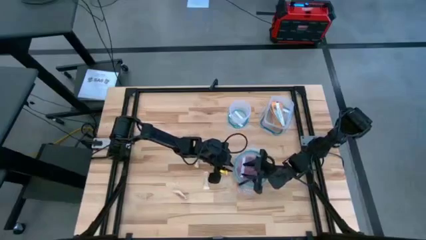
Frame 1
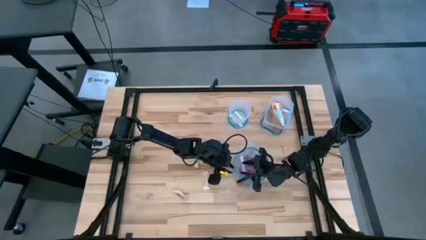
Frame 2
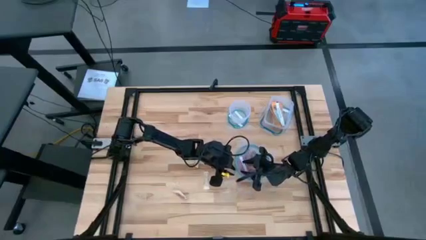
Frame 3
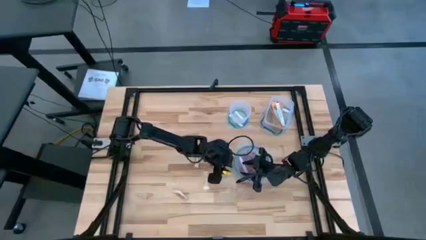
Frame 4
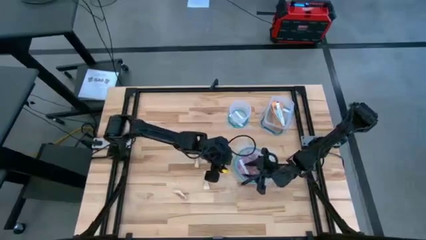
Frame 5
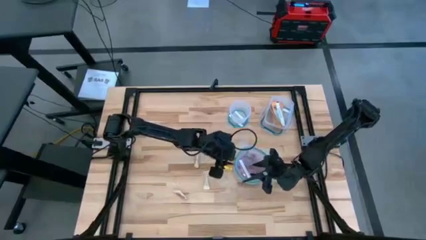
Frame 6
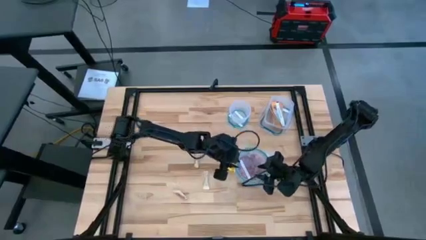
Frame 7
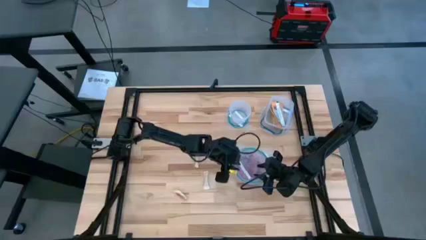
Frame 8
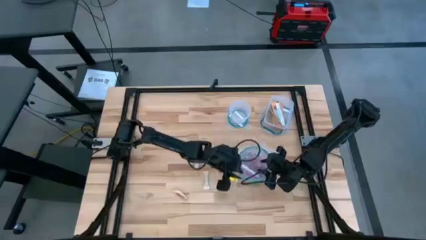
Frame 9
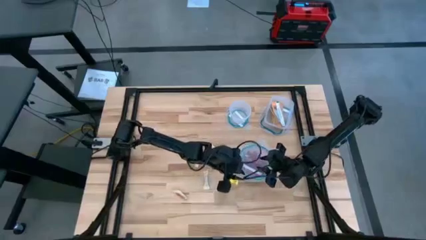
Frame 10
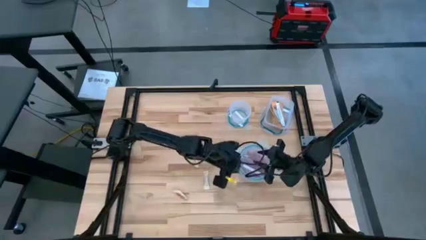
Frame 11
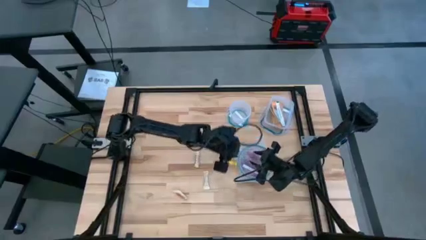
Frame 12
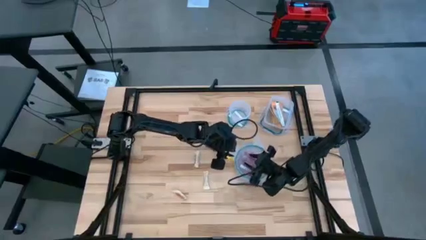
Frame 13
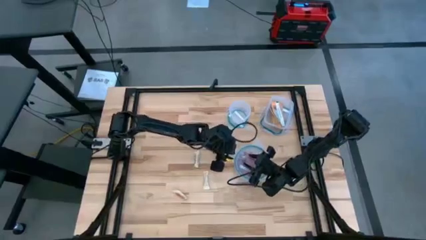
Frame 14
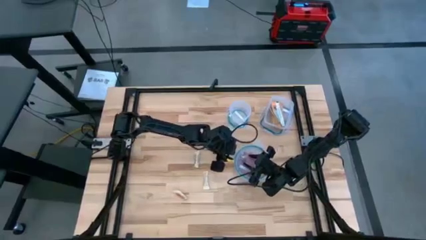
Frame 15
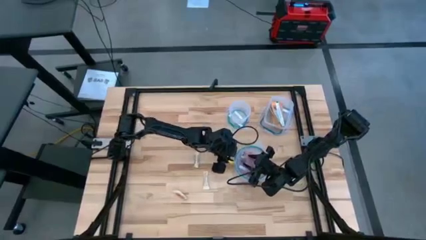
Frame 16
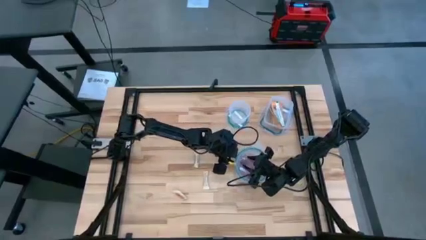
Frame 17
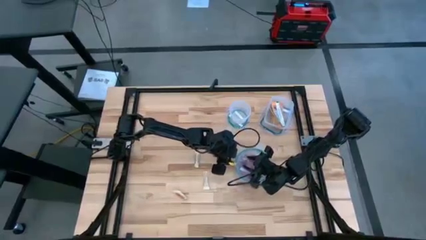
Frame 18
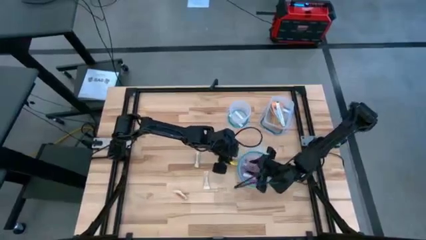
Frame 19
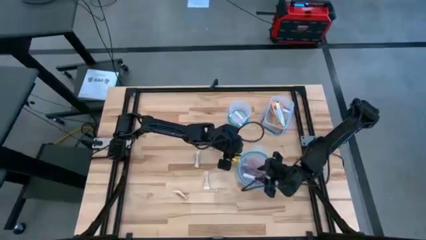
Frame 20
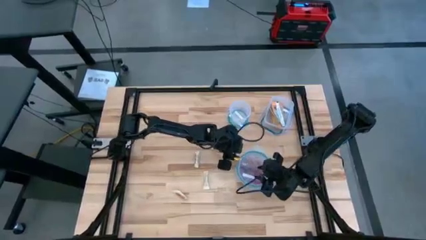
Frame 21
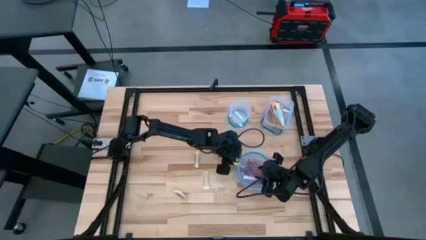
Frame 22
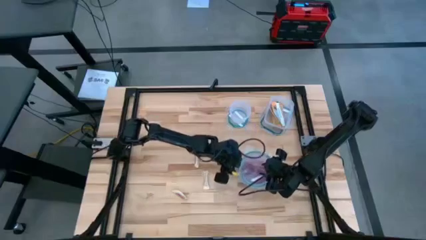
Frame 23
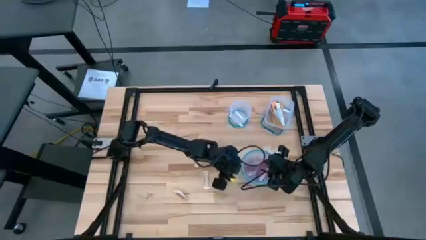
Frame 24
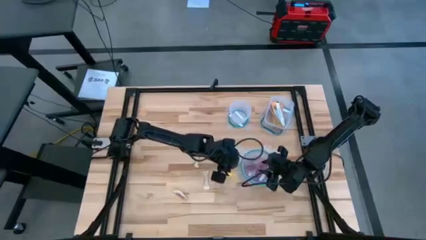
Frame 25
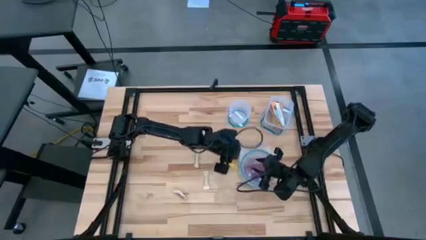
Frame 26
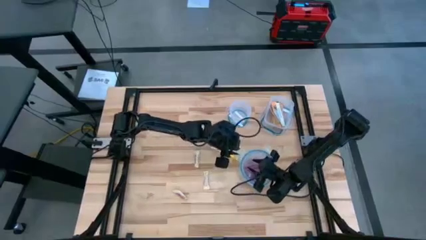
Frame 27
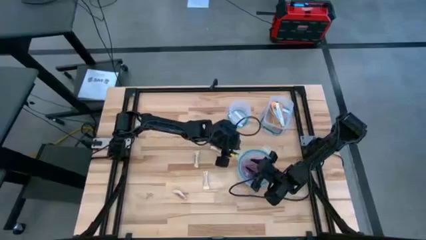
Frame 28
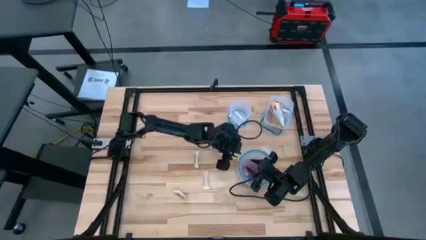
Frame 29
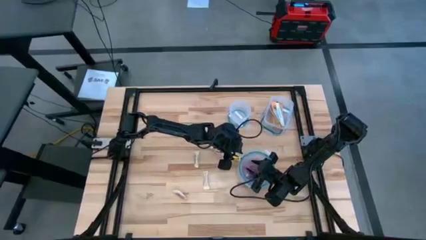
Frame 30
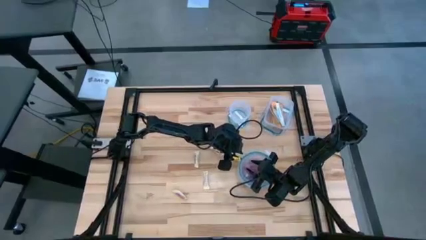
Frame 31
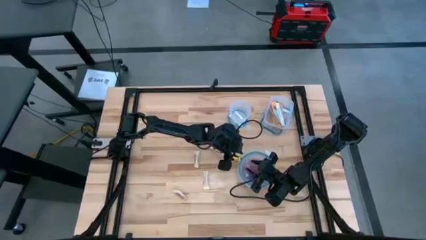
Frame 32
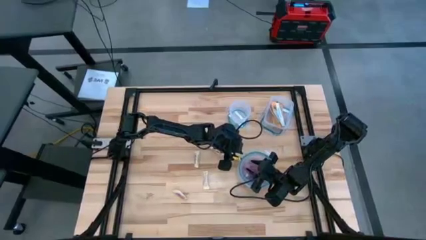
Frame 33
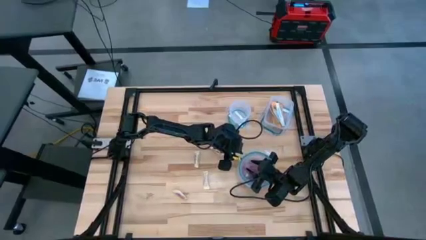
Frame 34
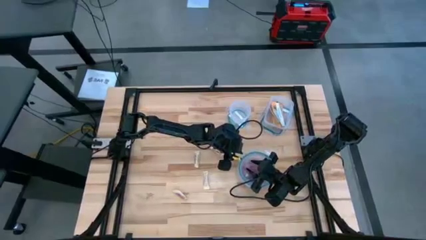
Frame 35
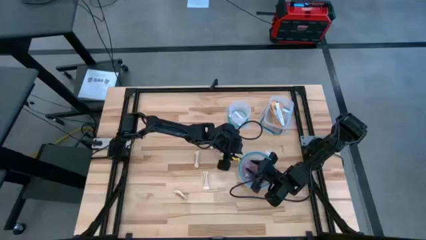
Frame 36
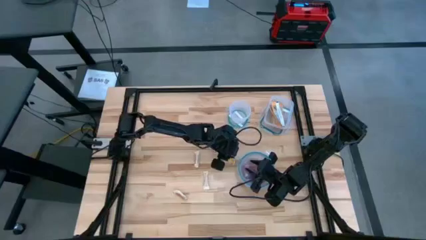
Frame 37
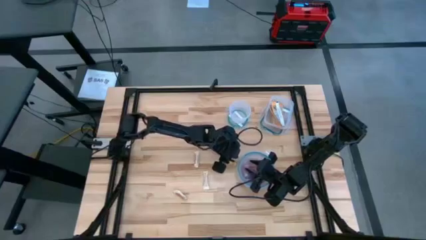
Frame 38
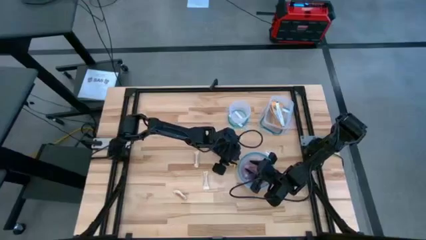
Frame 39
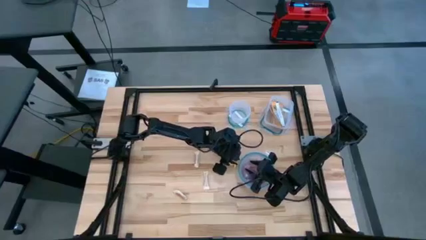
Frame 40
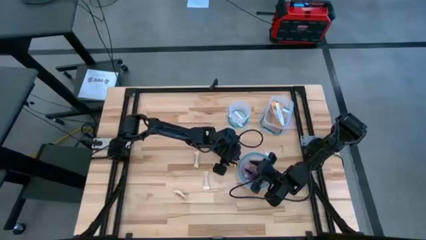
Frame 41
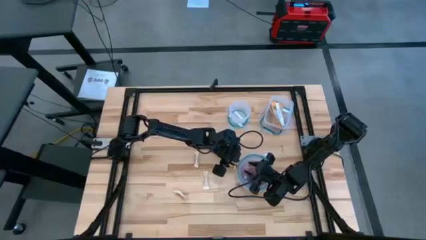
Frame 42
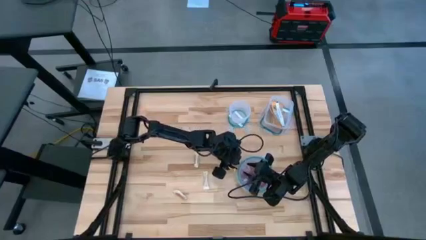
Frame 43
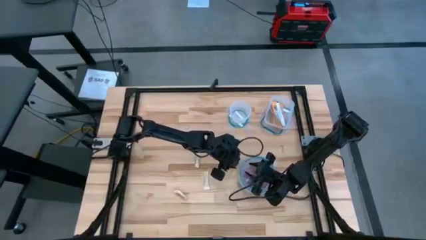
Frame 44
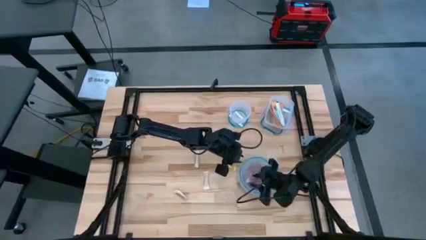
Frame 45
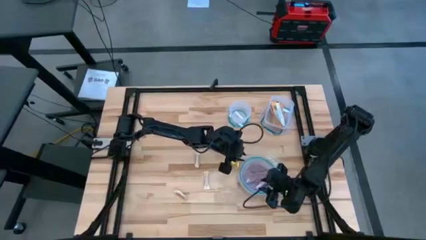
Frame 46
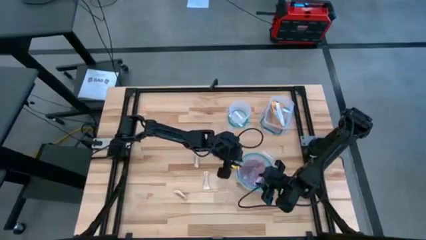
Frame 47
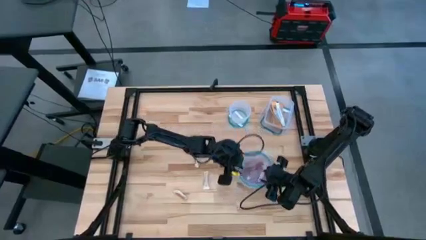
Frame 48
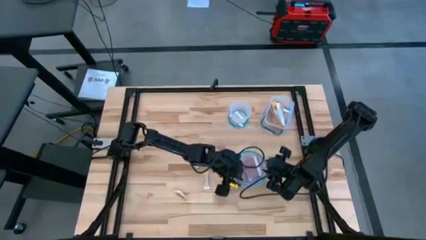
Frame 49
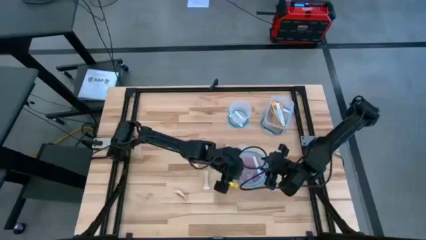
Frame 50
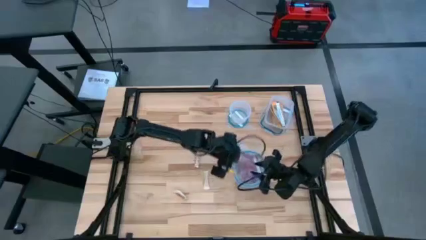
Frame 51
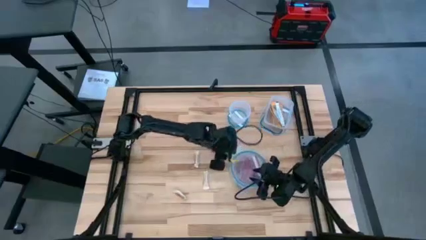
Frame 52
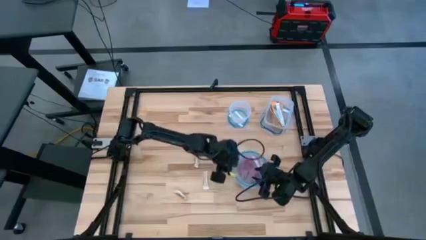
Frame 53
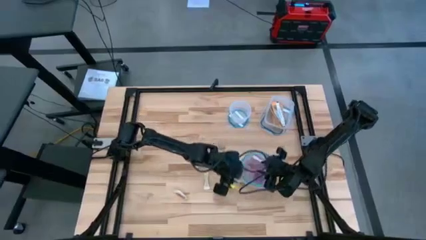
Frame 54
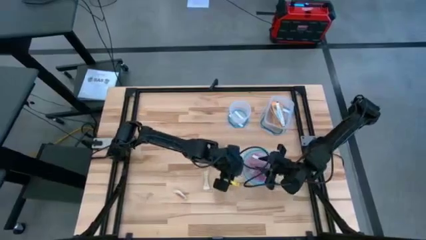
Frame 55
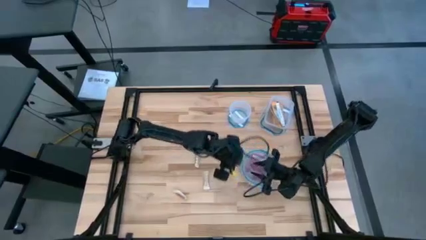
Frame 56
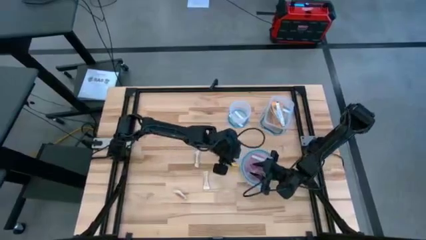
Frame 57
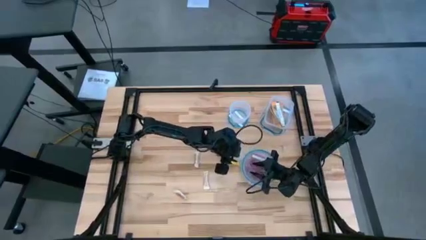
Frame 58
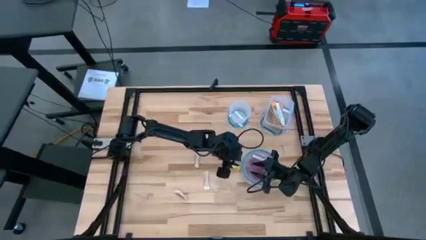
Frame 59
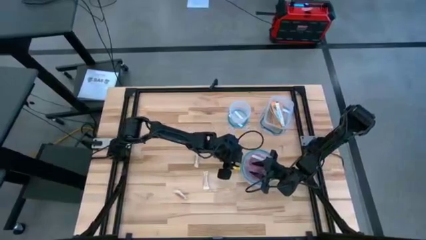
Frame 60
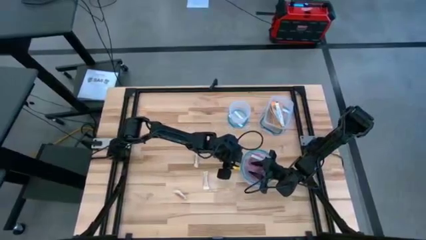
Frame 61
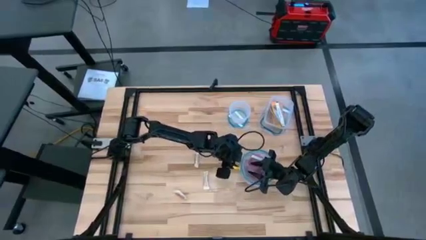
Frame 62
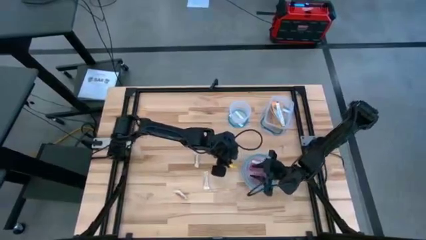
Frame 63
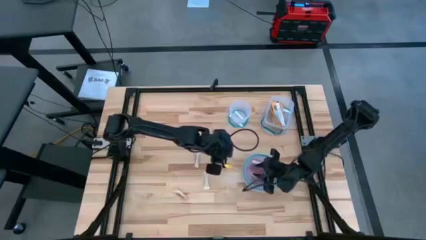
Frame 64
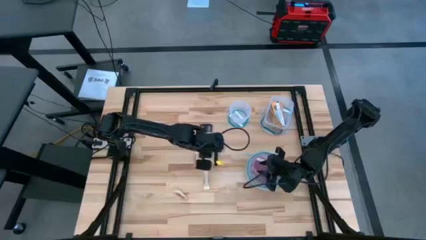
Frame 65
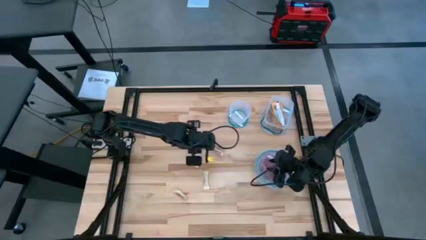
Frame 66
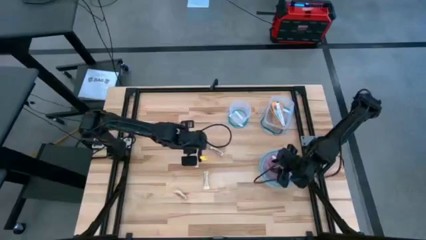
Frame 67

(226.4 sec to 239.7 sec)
Task: Sort candy
Close the big round transparent bin

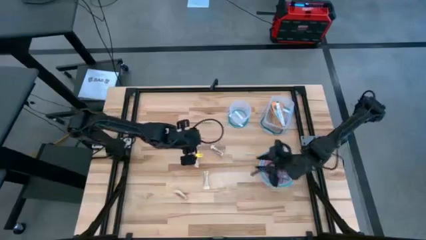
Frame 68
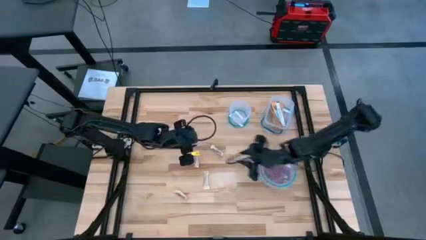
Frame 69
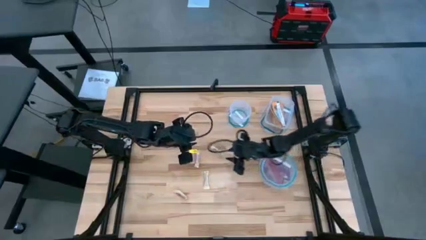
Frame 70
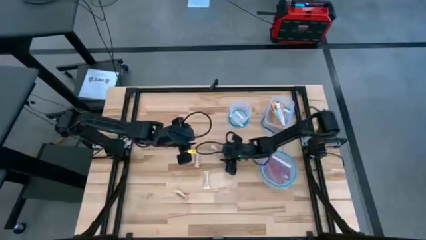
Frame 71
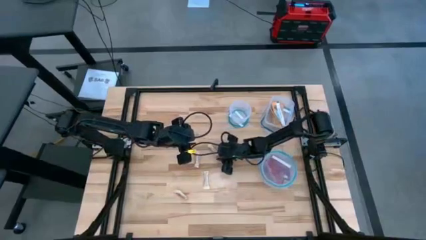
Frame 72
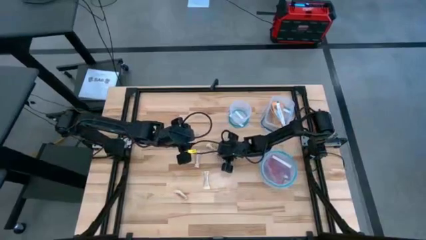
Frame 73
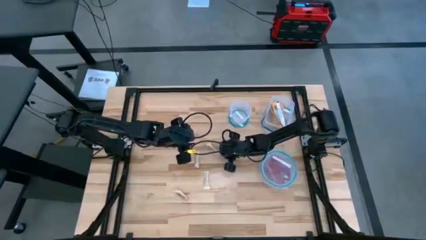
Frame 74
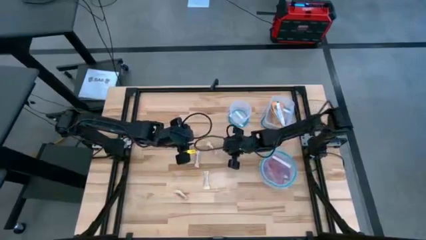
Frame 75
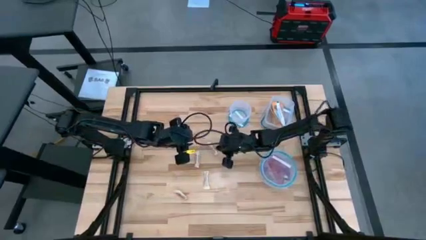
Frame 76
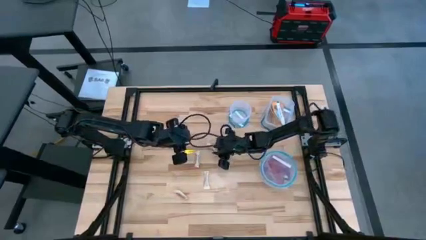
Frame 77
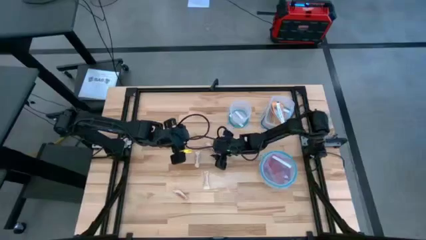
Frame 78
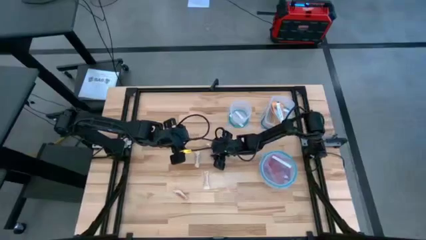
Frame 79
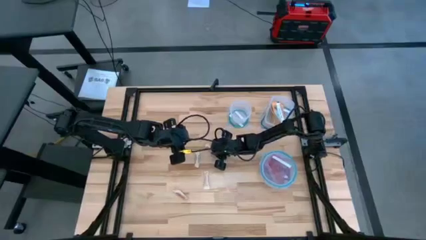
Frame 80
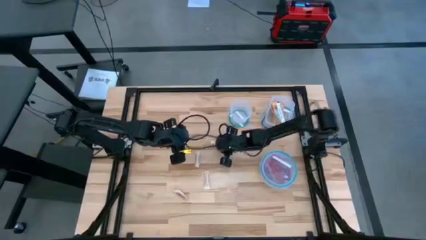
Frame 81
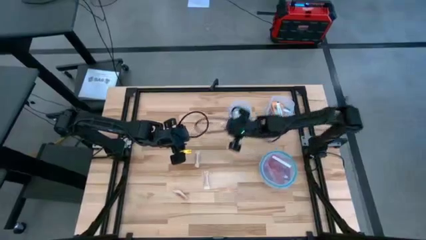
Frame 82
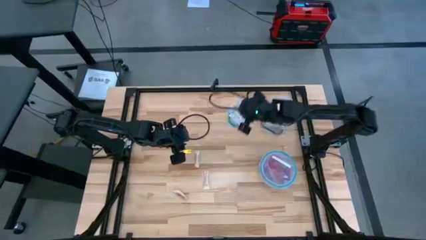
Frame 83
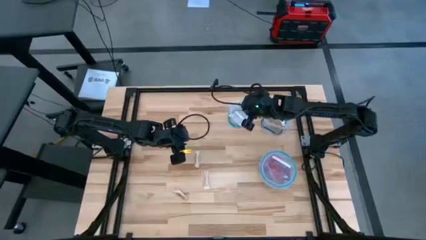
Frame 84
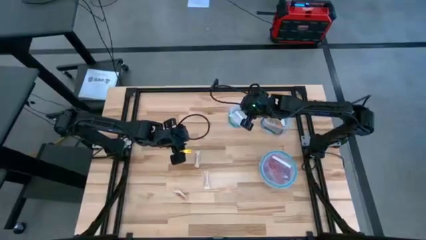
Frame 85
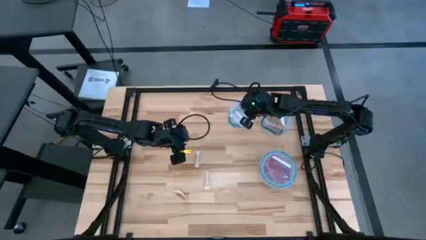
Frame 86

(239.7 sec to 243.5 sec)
Put the white candy into the small round transparent bin

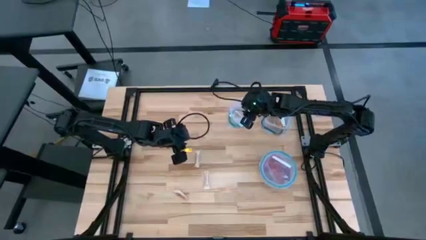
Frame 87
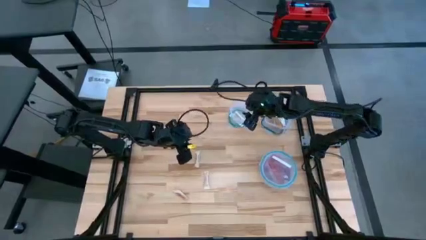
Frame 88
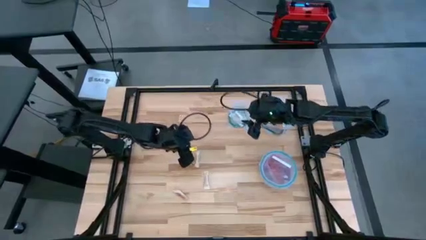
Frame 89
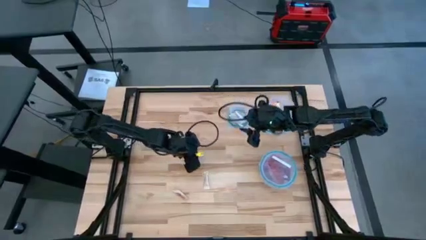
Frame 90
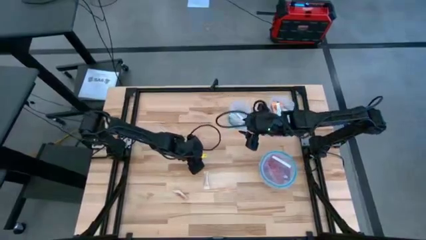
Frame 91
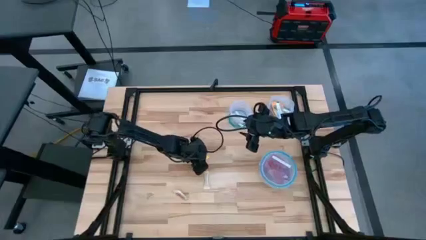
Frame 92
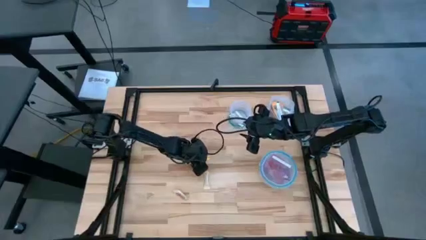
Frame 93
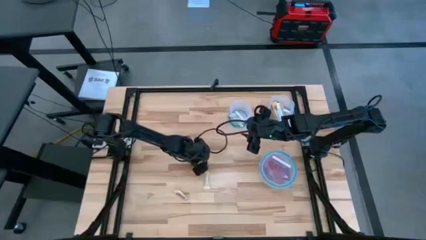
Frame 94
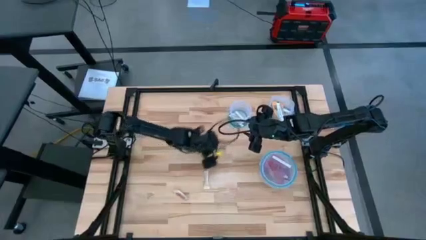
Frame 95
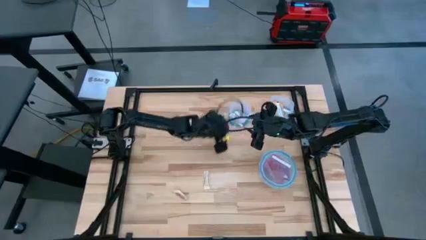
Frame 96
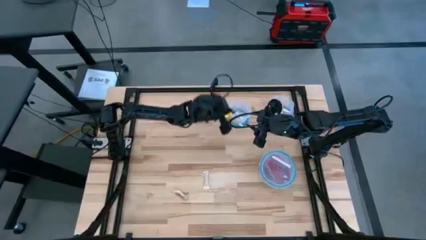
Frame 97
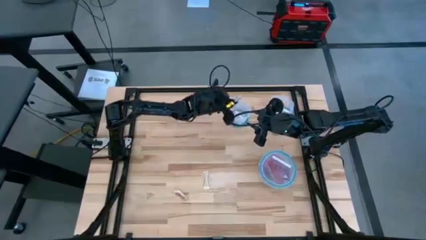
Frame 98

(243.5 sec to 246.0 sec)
Put the white candy into the small round transparent bin
